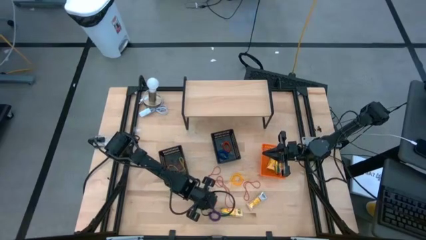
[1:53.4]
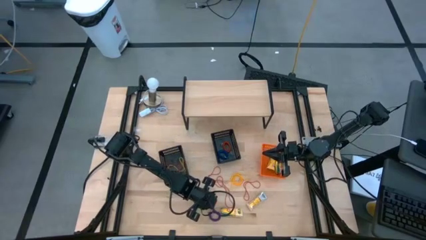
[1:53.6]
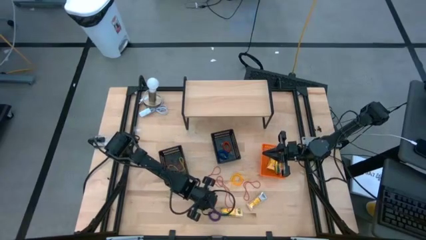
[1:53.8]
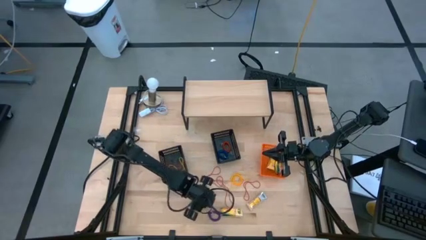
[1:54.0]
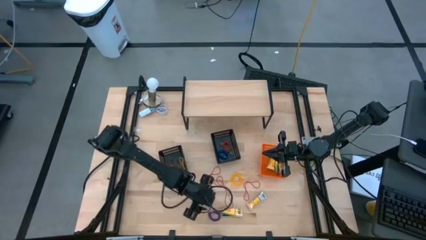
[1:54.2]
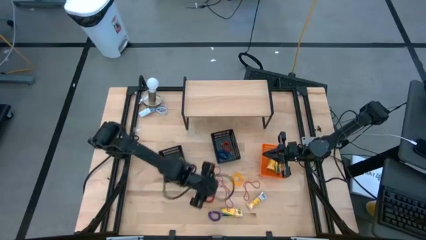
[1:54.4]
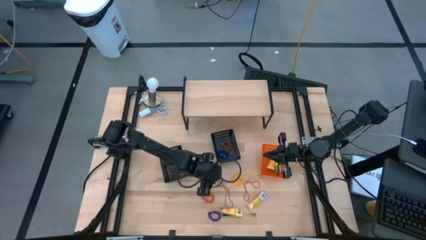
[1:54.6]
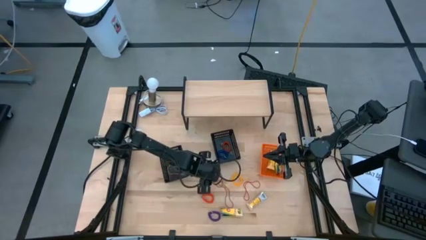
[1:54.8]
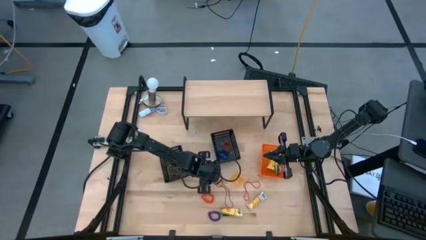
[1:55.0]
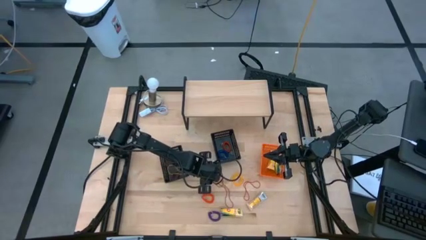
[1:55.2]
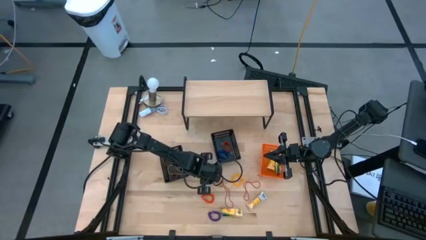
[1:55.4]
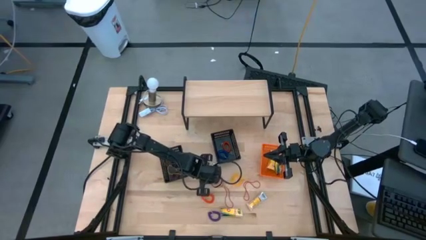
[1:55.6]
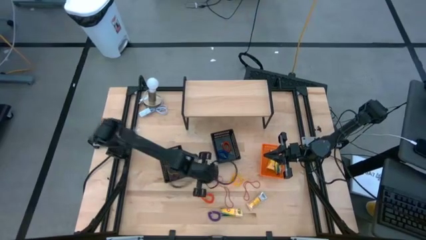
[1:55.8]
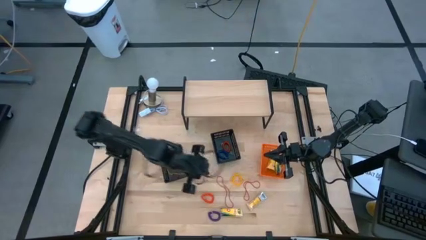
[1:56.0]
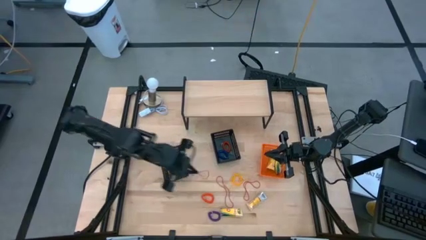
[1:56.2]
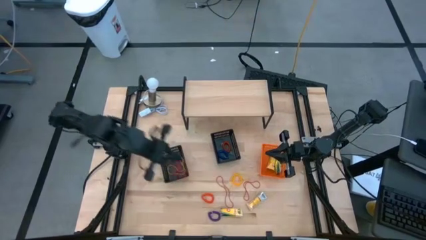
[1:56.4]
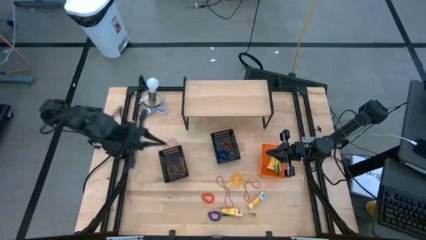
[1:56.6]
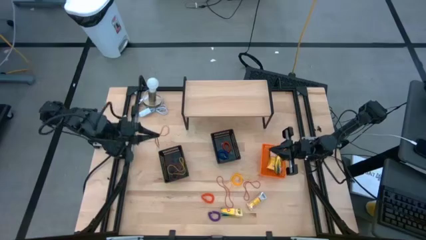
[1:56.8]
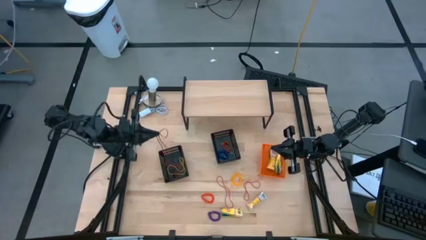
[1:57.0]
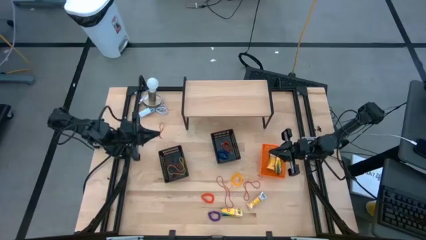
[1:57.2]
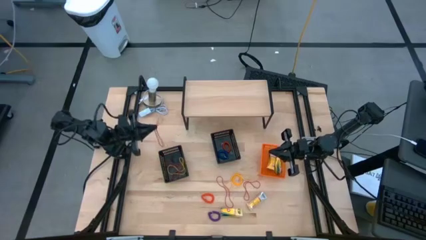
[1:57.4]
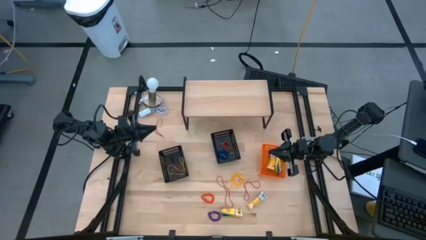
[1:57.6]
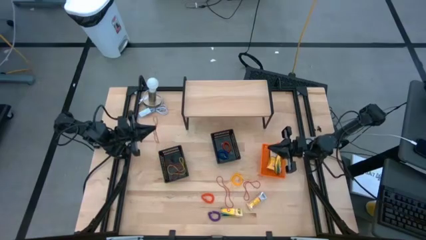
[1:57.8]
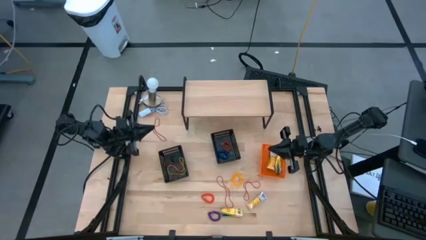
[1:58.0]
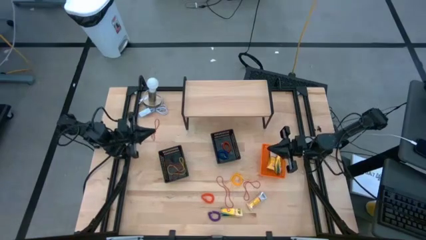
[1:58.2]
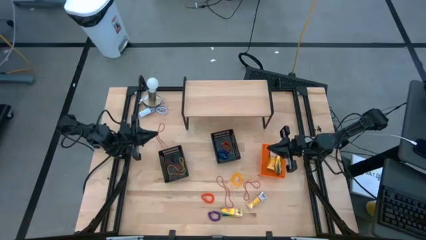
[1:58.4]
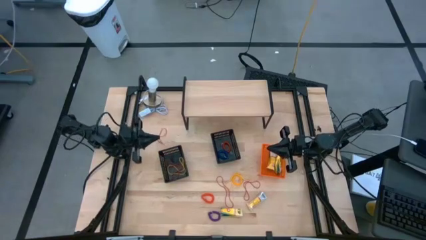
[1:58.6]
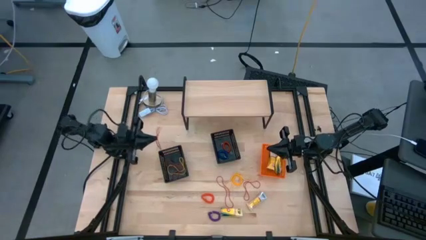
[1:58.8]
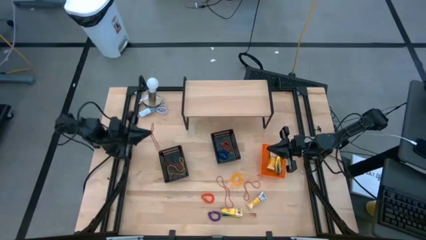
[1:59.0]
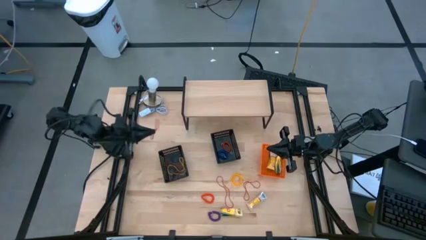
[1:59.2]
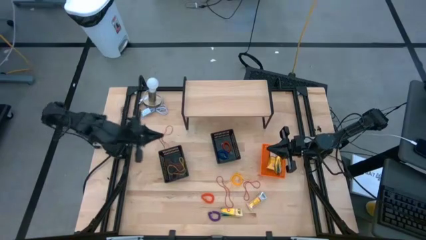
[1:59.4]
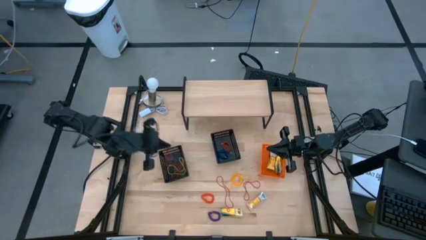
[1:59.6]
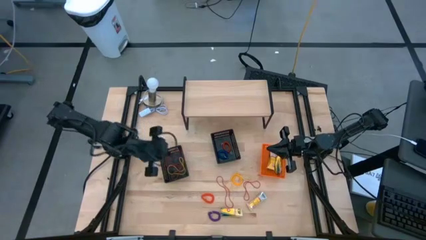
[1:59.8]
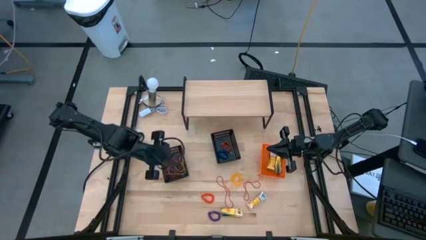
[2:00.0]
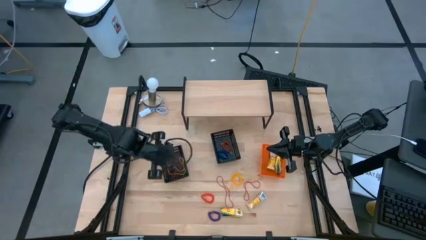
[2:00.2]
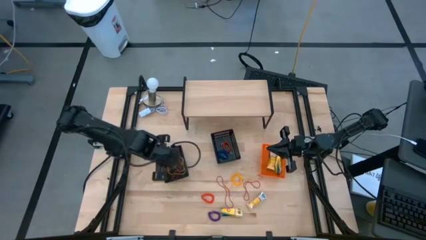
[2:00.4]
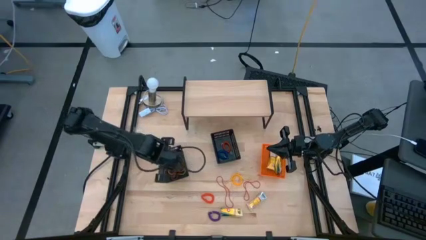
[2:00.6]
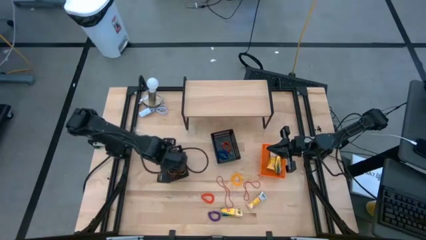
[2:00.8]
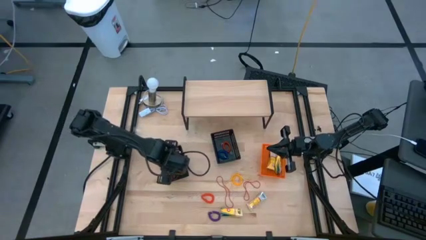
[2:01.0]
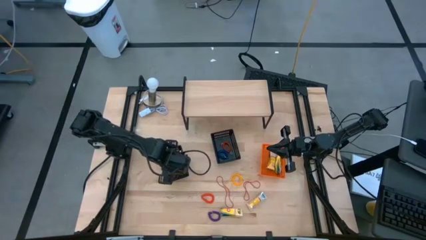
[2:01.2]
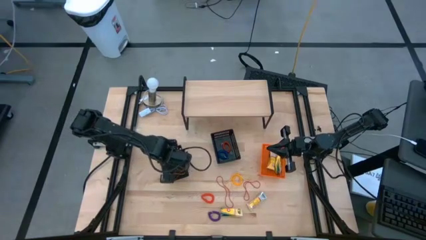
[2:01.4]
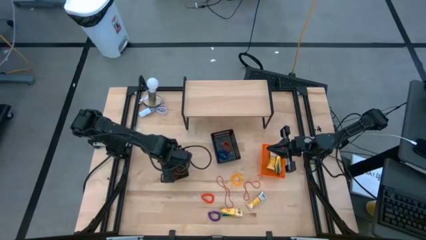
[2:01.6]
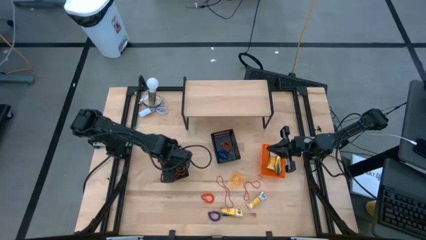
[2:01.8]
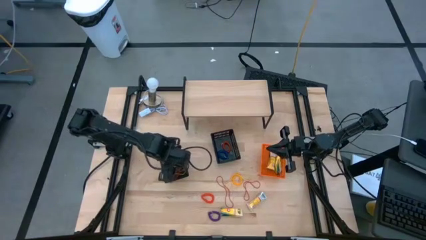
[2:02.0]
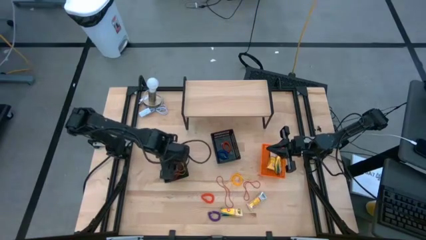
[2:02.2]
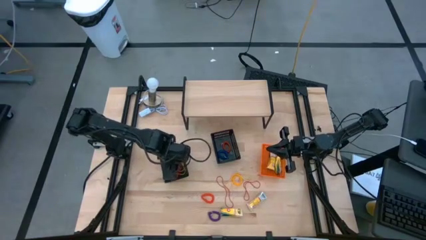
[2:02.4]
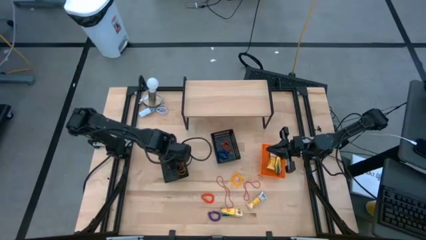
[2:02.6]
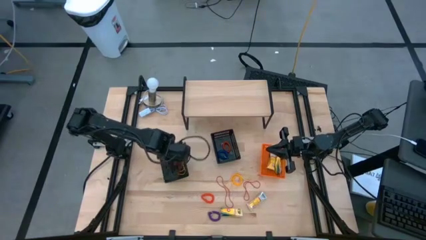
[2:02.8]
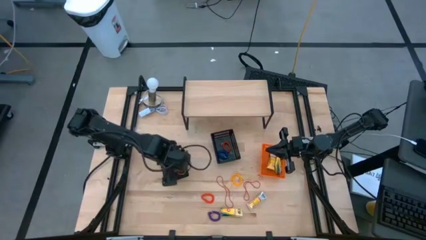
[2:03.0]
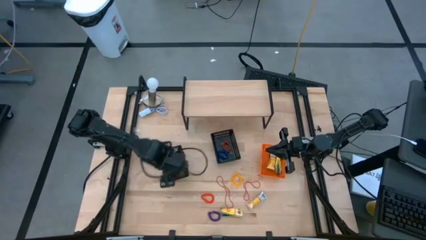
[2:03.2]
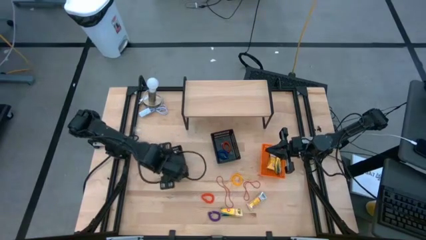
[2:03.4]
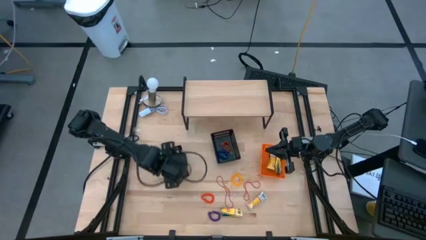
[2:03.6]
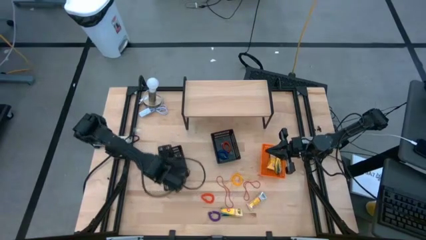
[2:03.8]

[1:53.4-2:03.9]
Task: Pick & Place Office Desk Supplies
Put the red rubber band into the left black bin

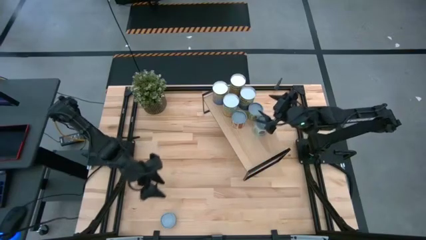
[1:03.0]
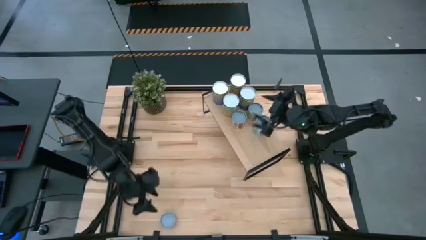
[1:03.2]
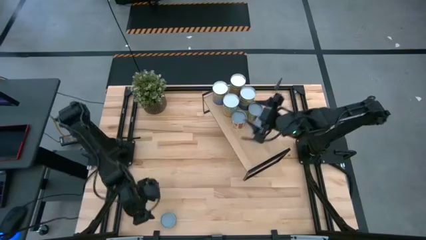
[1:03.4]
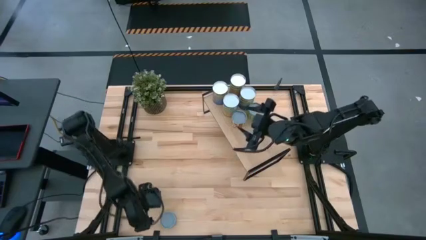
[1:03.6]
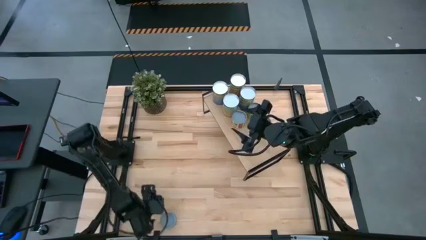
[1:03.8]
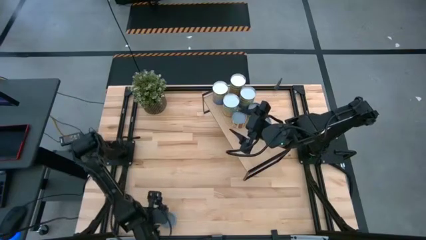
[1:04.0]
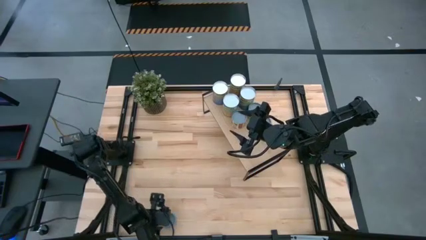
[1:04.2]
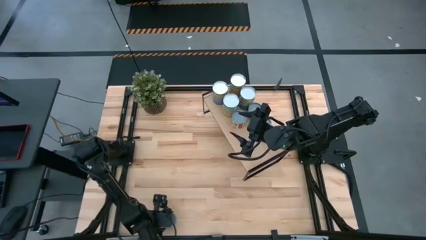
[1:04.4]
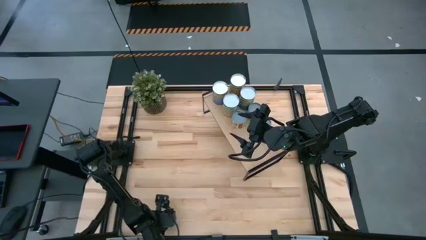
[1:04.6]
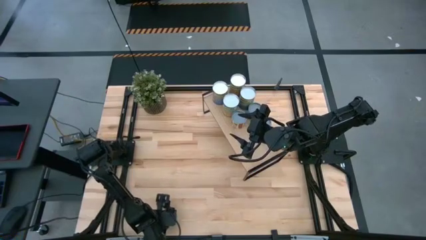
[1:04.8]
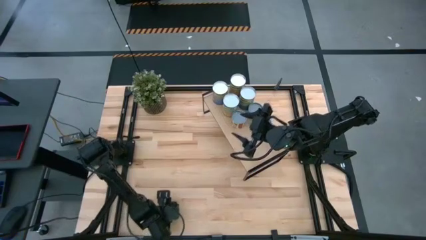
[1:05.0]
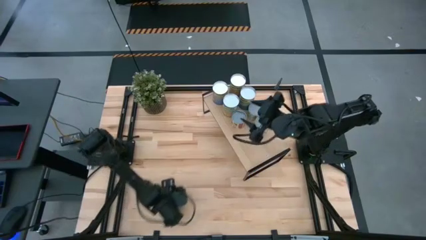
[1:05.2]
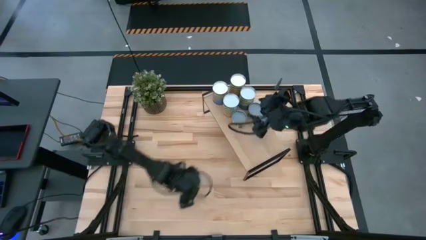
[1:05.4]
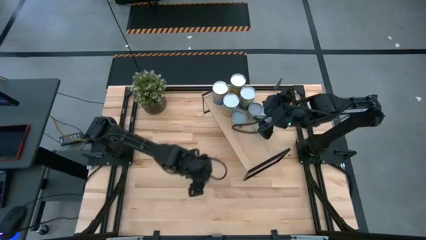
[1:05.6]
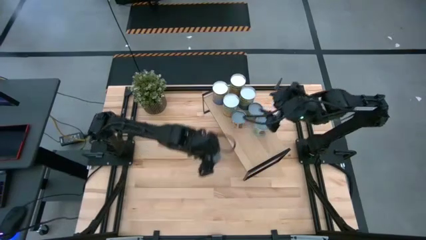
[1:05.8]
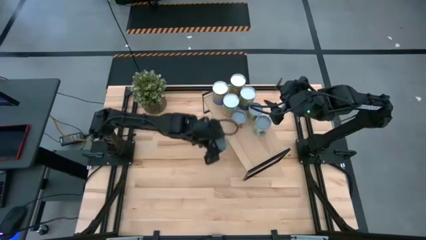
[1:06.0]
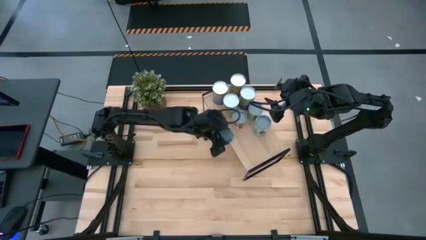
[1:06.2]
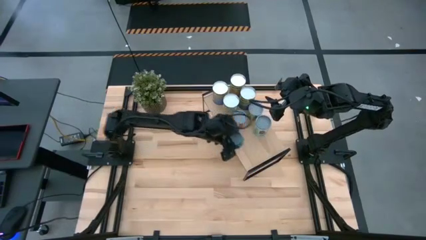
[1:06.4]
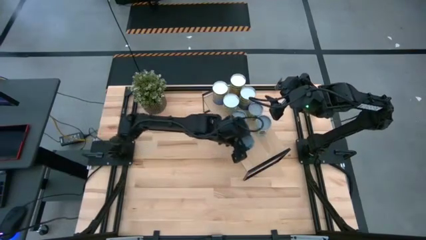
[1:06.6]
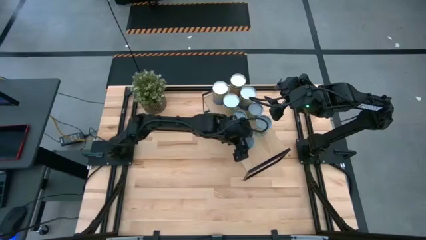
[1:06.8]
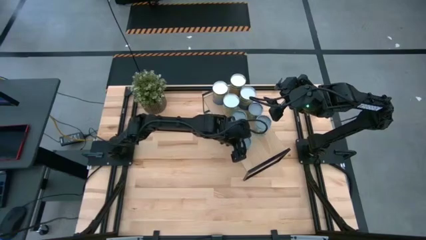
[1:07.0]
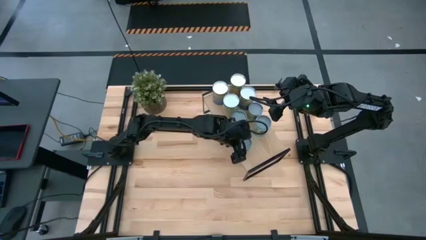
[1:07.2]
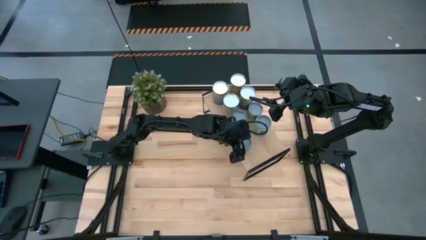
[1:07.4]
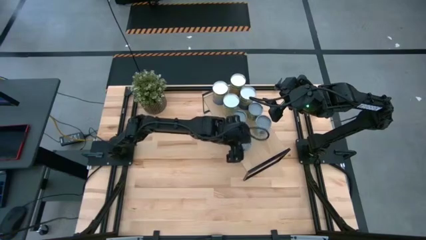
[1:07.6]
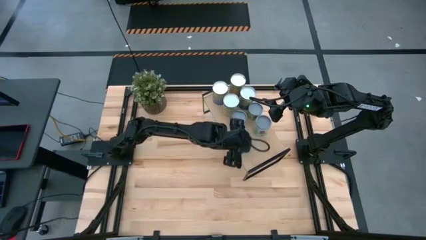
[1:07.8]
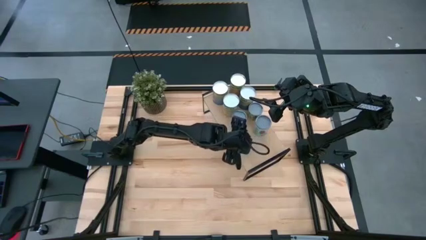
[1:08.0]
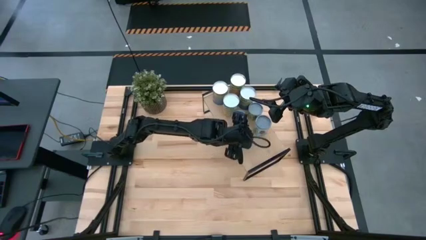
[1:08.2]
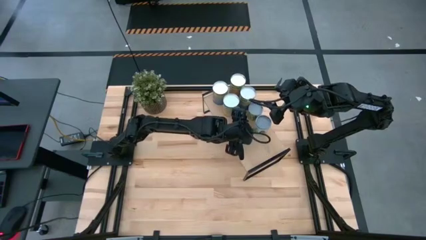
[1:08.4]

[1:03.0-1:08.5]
Task: Pick and place cans onto a shelf
Put the blue tuna can on the shelf

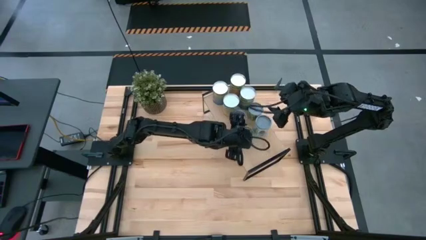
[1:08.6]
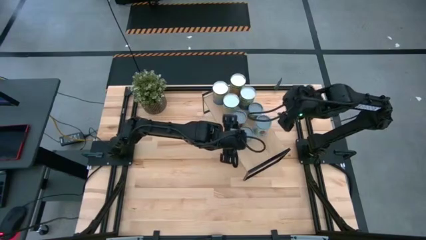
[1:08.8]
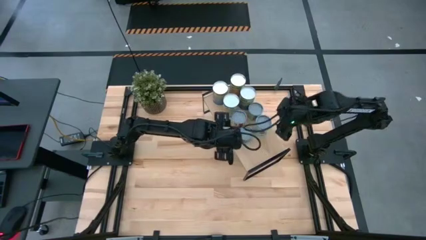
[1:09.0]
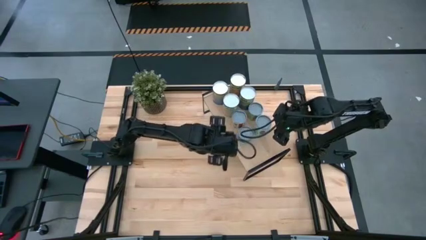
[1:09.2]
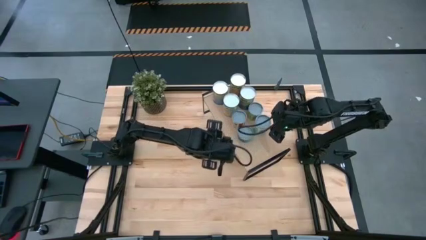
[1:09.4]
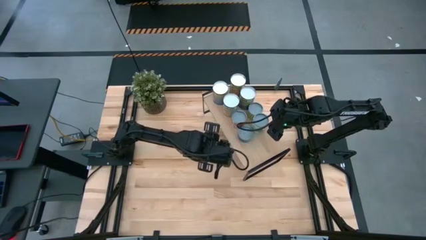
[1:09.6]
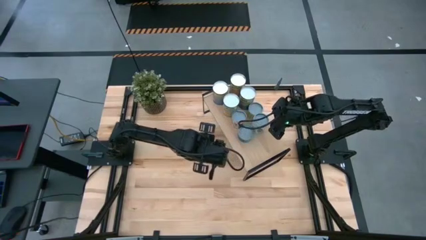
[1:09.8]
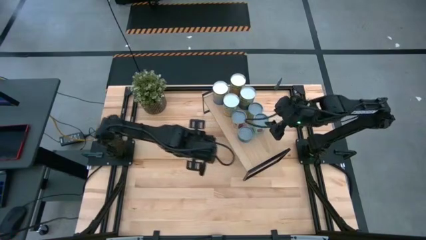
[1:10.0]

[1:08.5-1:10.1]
Adjust the canned vegetables on the shelf
